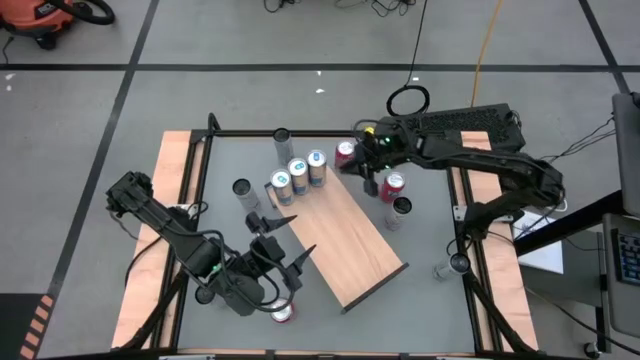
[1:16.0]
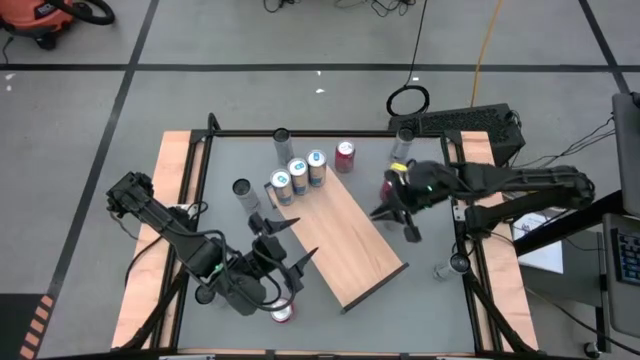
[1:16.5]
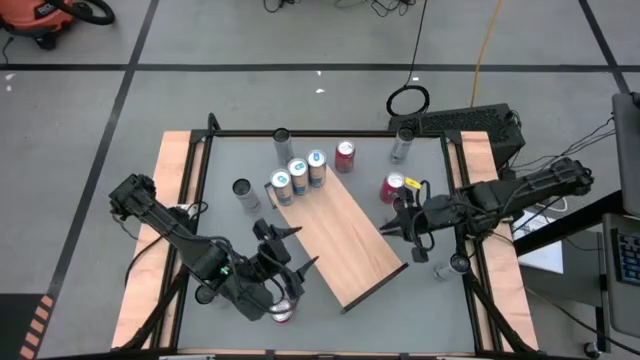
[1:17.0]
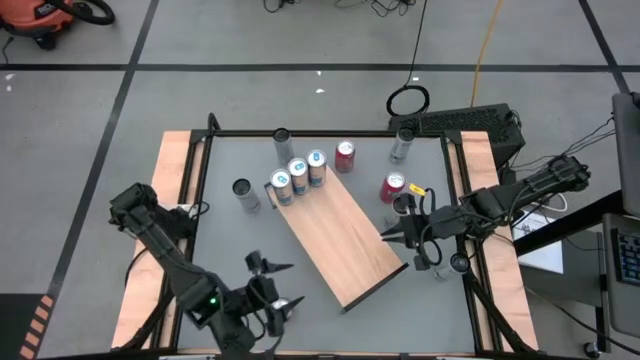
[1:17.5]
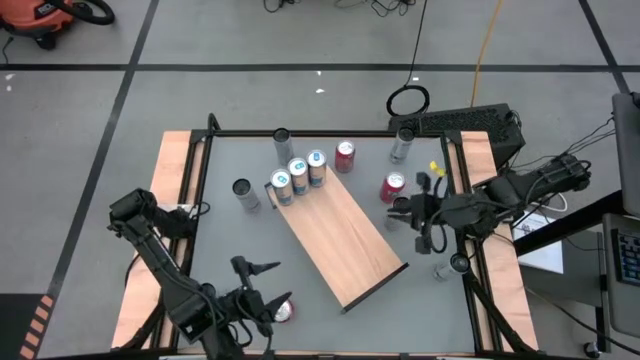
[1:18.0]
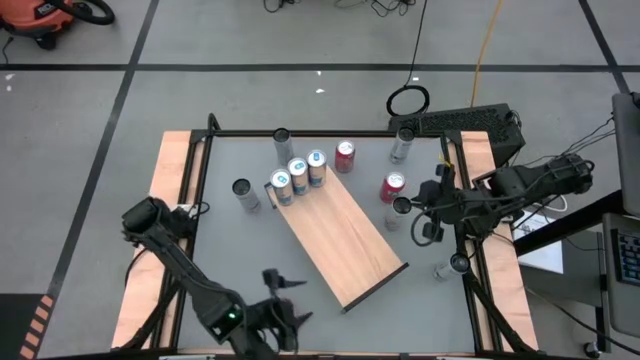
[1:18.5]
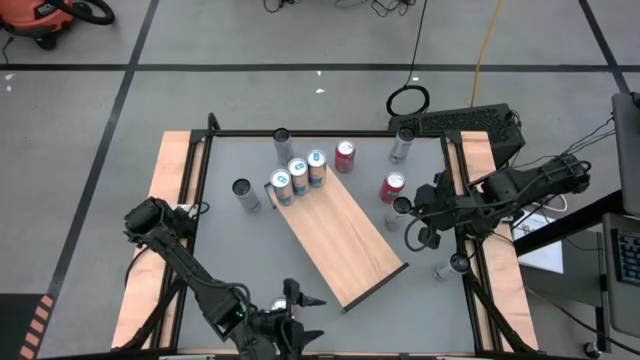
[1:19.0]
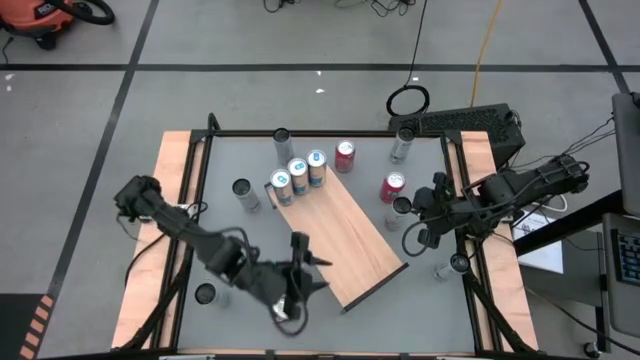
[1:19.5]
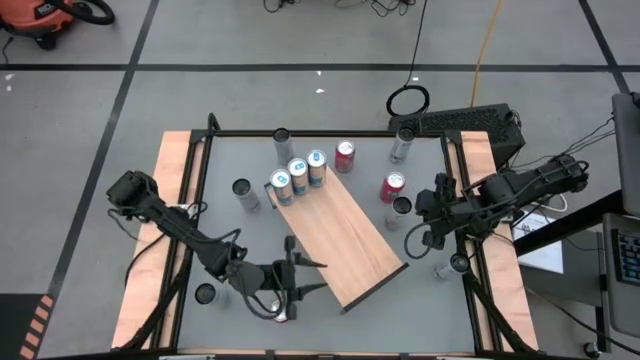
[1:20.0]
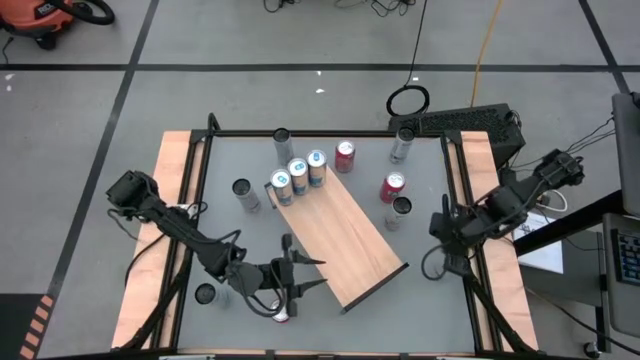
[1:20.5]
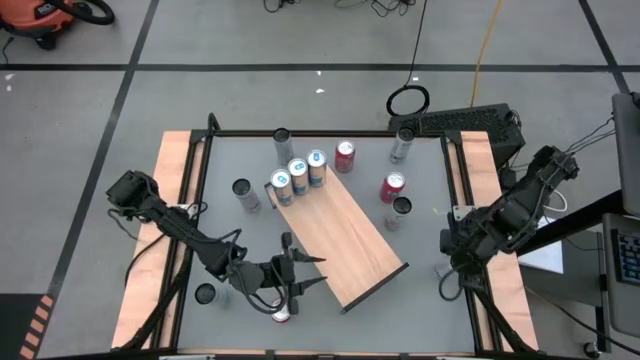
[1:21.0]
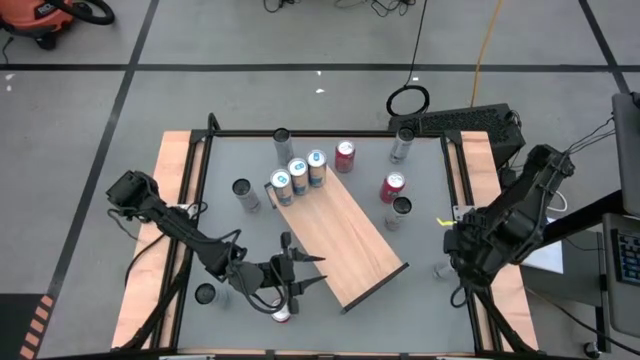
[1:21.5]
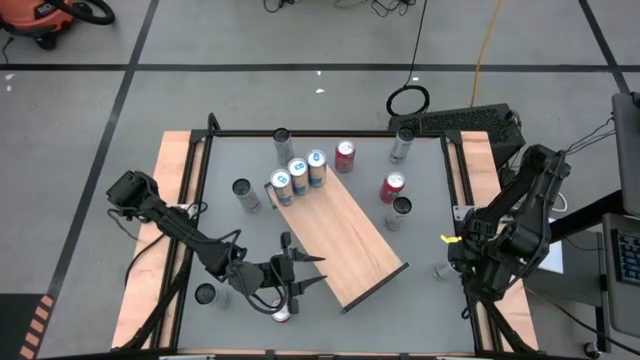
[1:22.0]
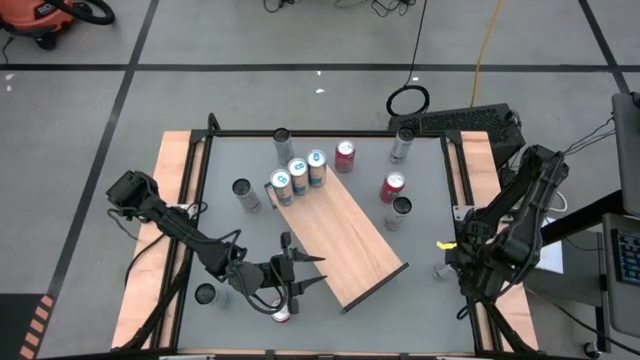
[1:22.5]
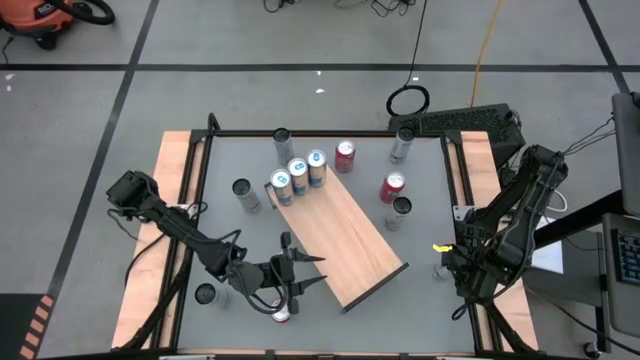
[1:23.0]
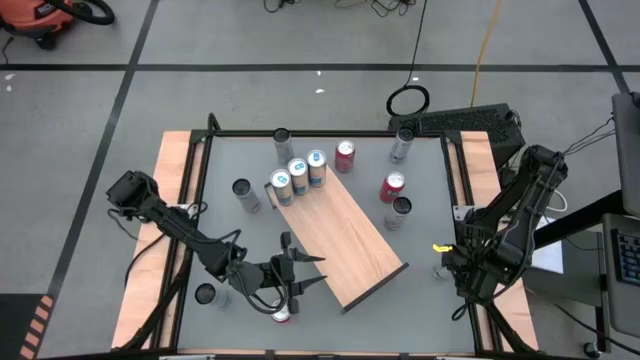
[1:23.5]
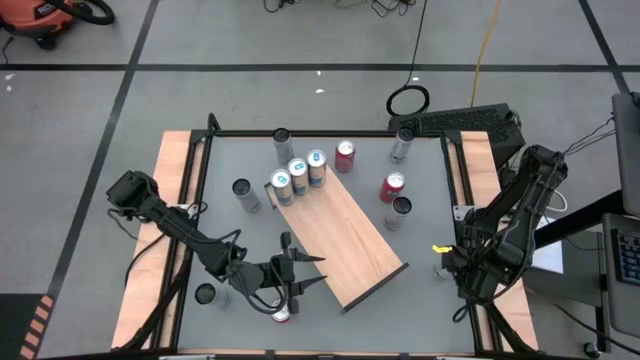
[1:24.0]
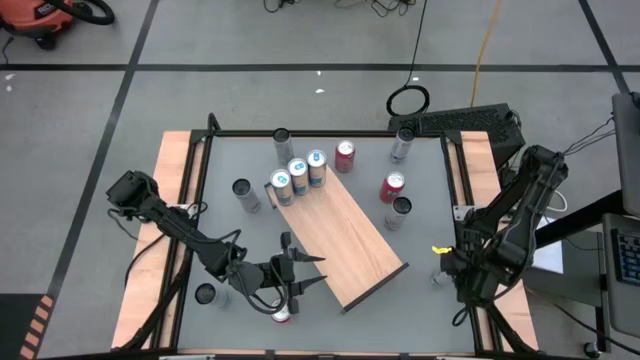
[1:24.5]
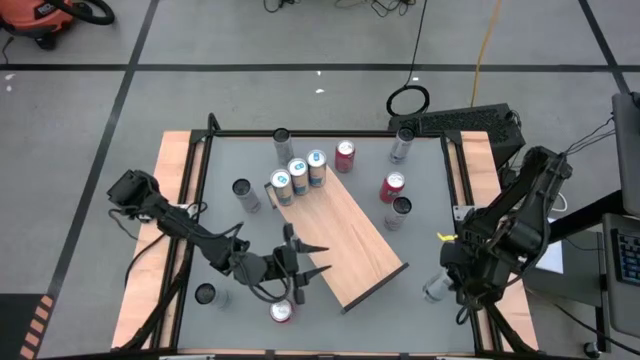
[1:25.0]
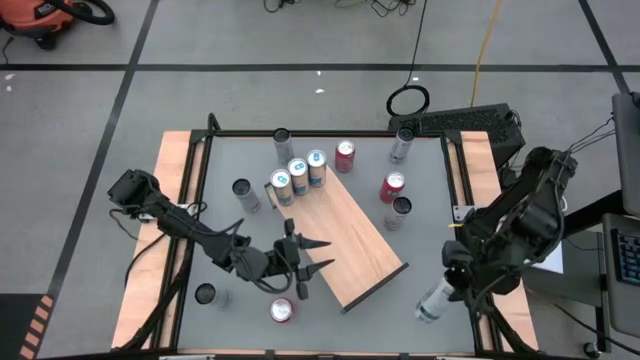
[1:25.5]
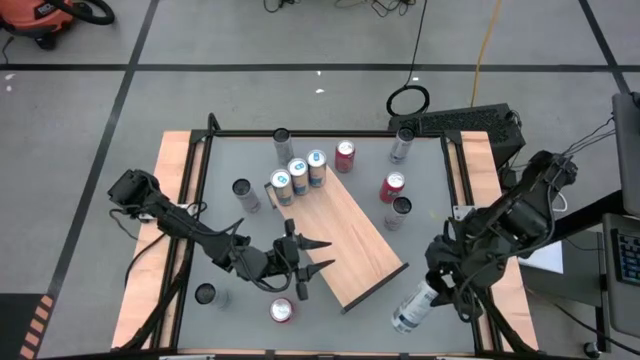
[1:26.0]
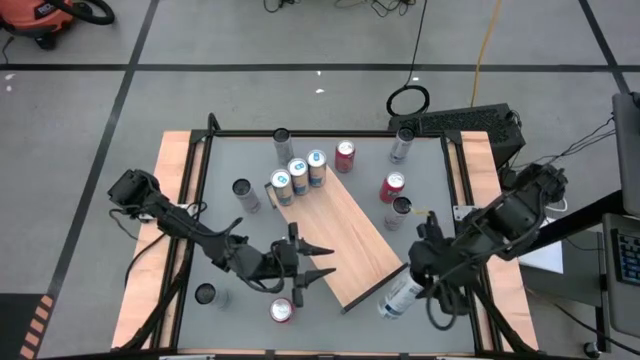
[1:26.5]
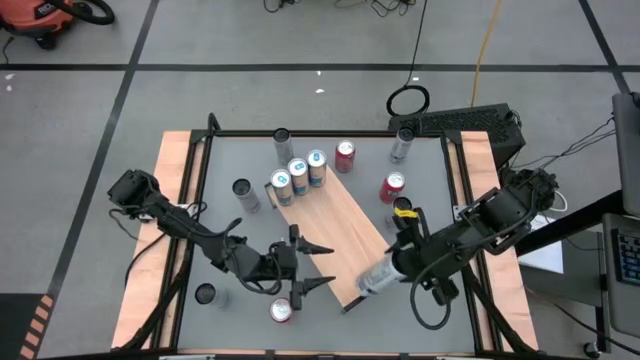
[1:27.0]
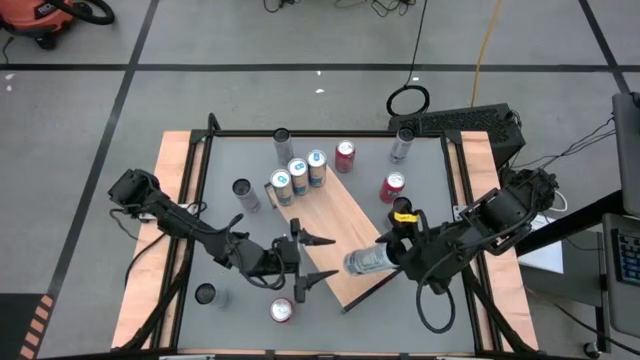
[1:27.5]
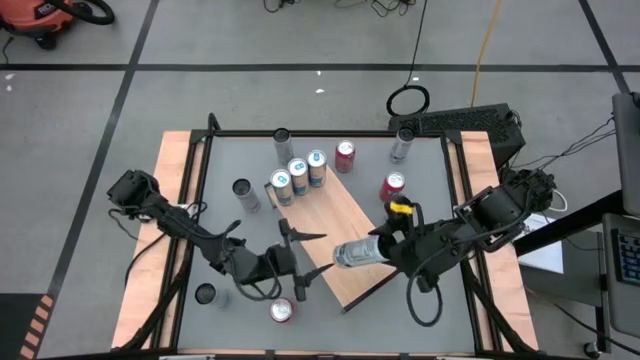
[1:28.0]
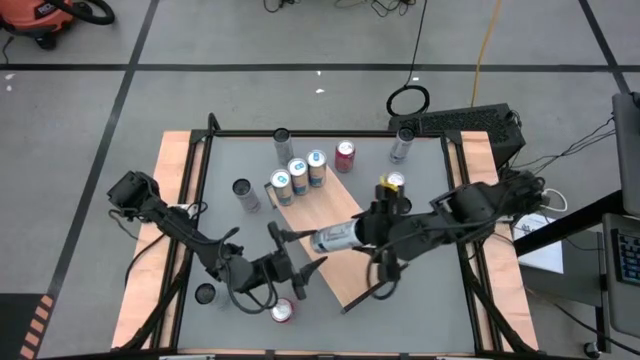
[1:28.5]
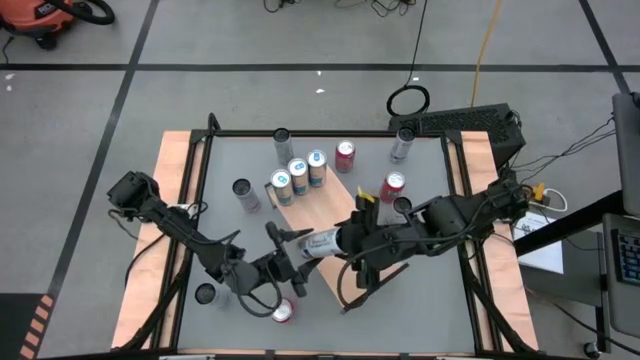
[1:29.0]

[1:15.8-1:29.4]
Task: Place canned beverage on shelf
Put the bottom right white soda can on the shelf

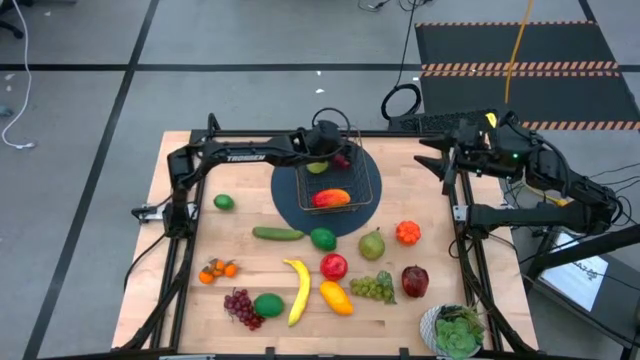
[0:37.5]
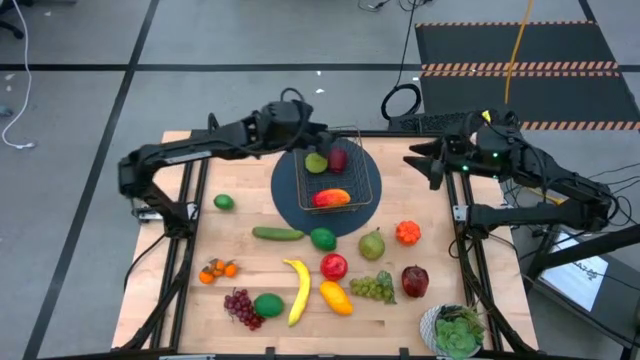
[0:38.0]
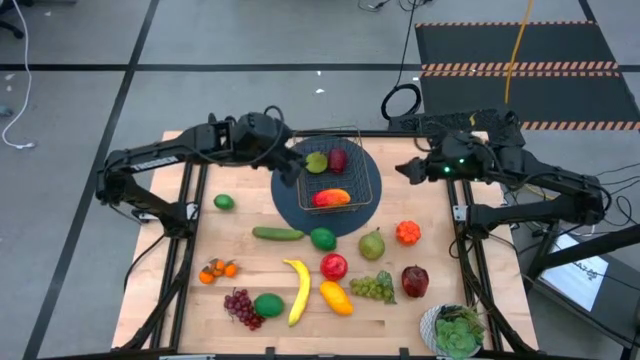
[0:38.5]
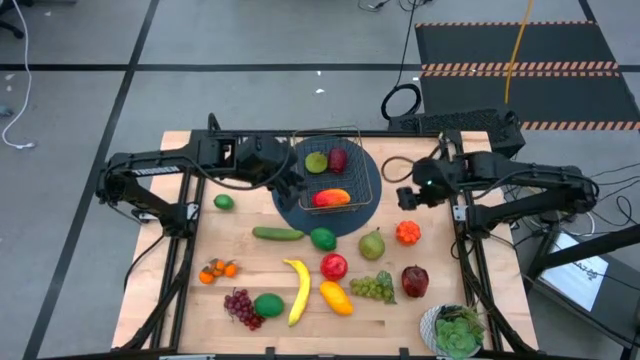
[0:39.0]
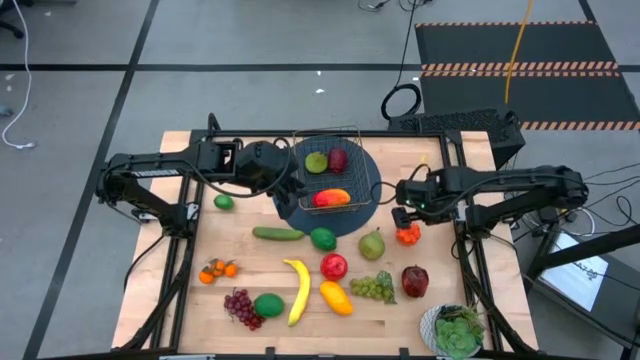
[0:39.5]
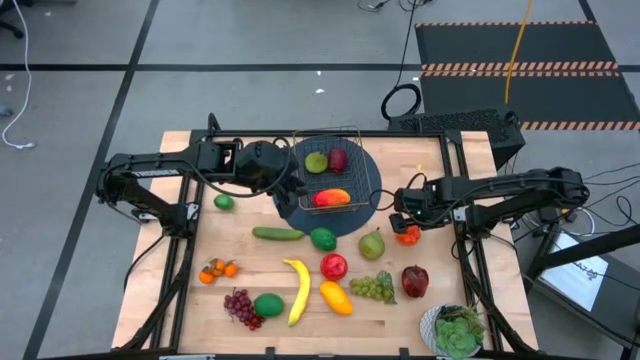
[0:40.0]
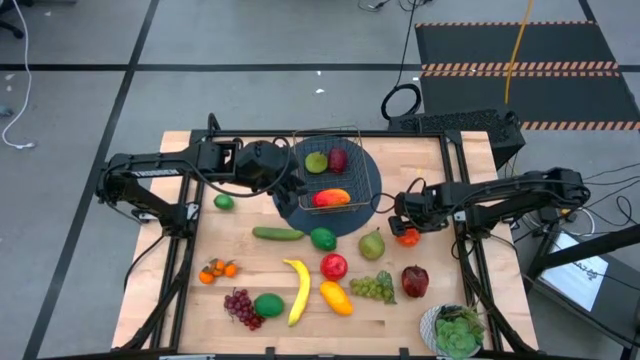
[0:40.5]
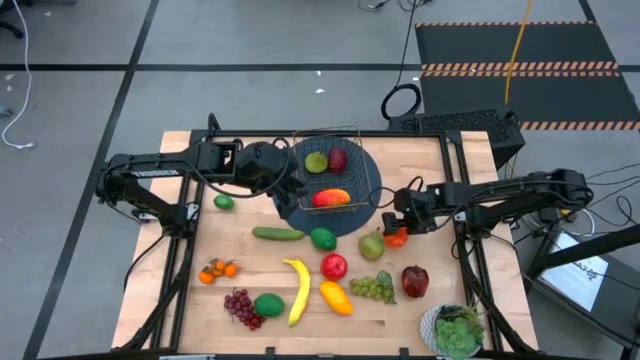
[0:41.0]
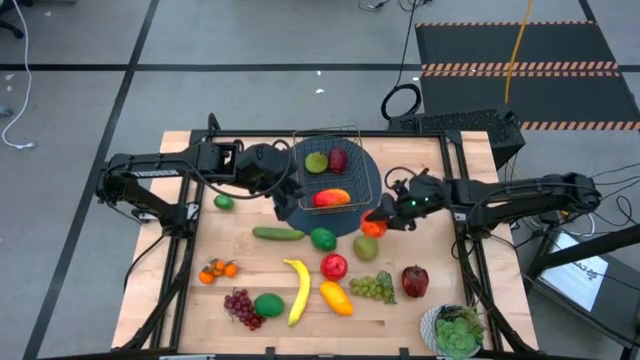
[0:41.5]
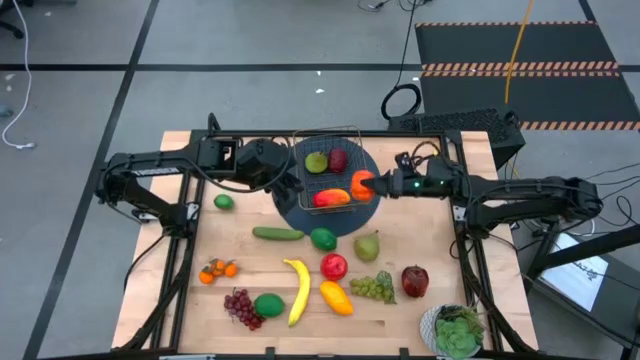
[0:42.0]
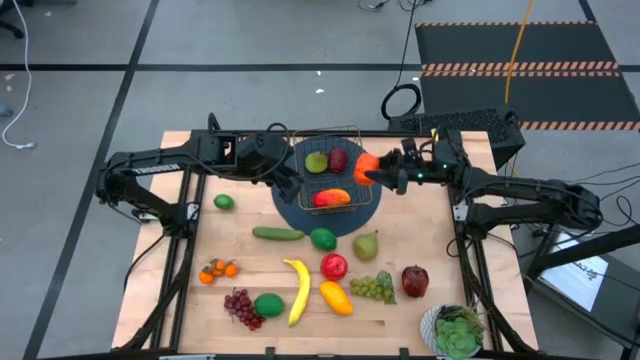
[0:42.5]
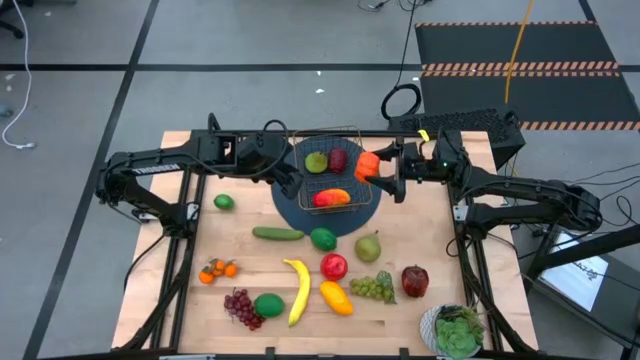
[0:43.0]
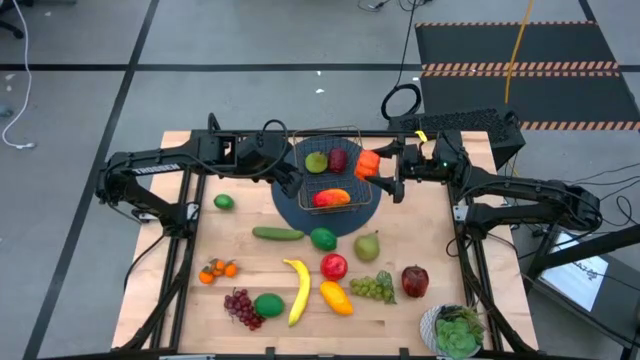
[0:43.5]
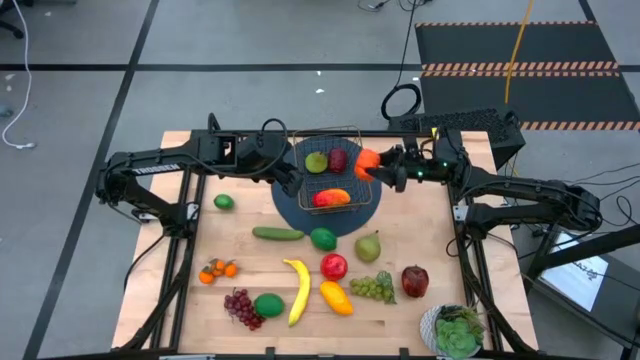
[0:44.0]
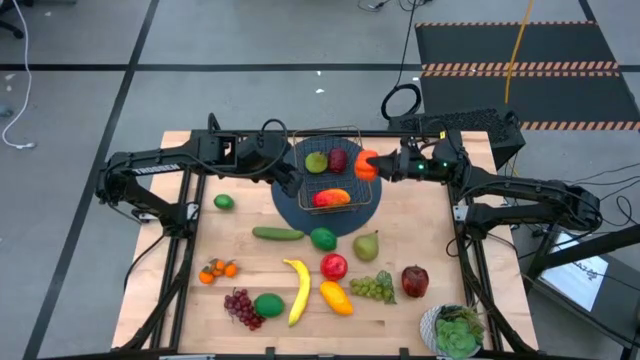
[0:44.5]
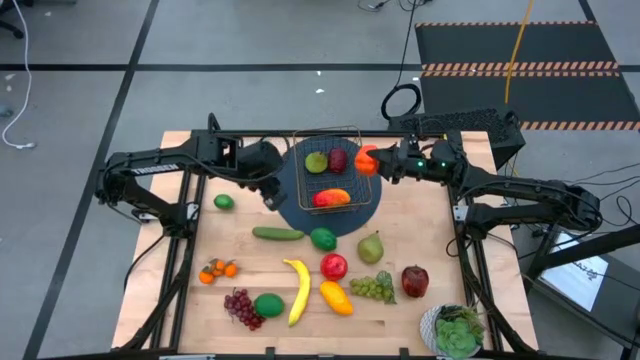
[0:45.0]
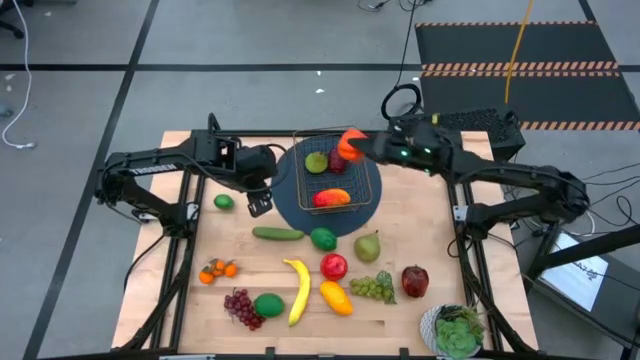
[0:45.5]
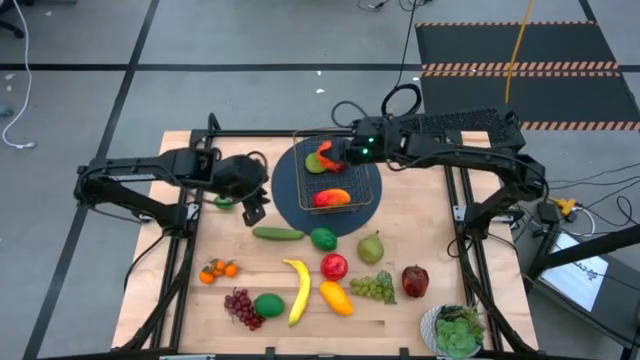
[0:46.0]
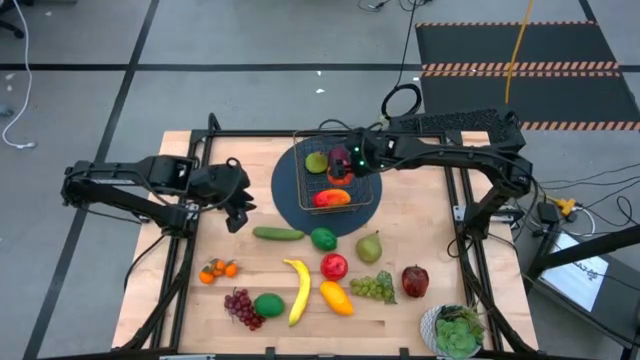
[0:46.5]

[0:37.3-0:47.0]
Task: Build produce basket
Put the orange pumpkin into the gold wire basket
